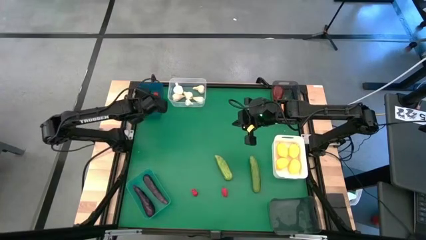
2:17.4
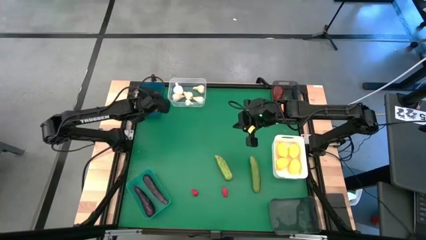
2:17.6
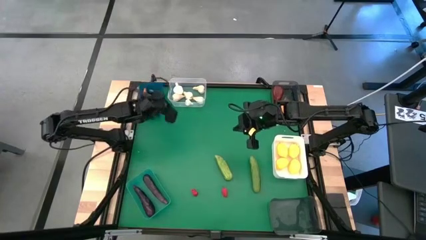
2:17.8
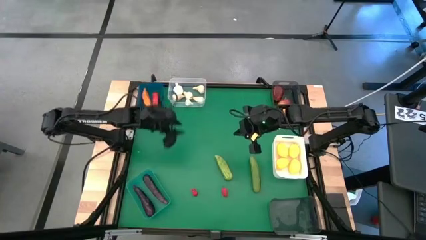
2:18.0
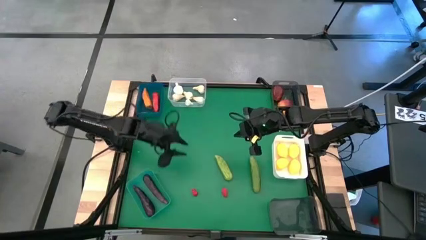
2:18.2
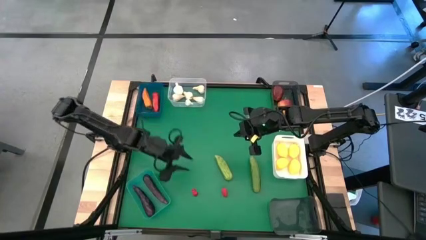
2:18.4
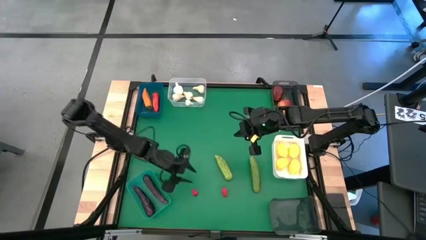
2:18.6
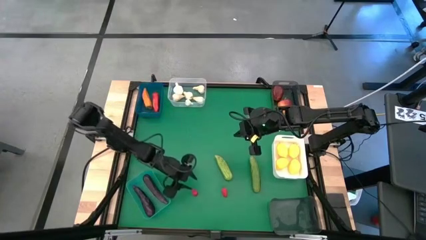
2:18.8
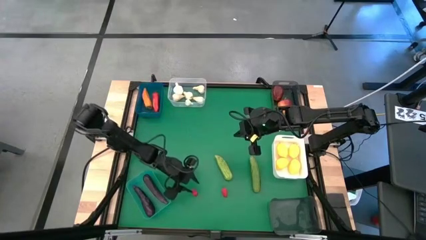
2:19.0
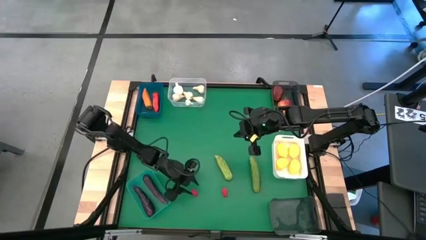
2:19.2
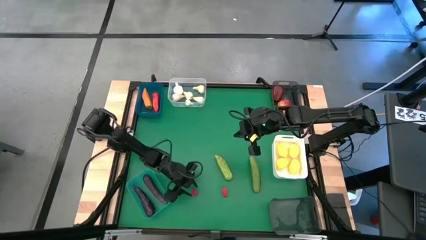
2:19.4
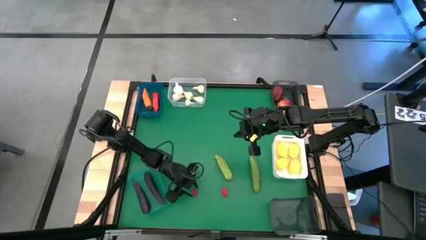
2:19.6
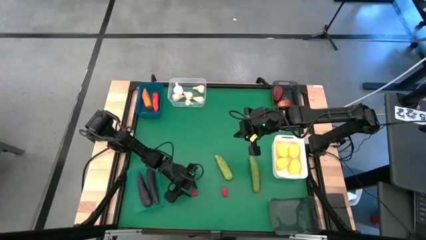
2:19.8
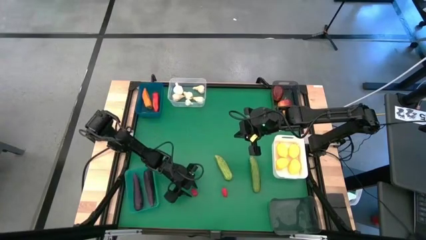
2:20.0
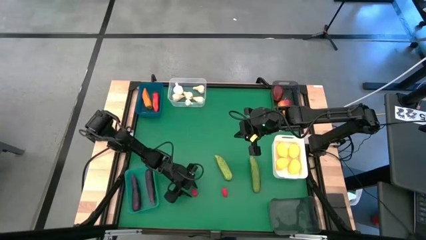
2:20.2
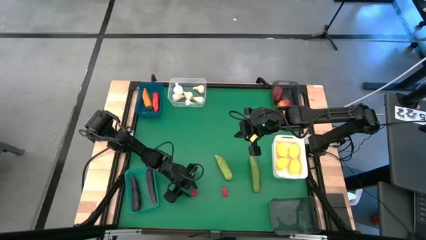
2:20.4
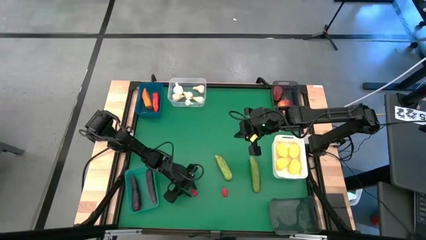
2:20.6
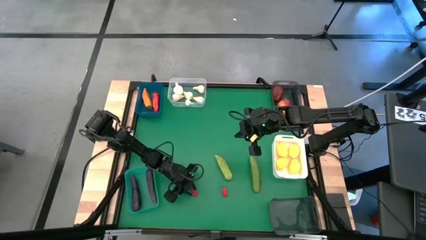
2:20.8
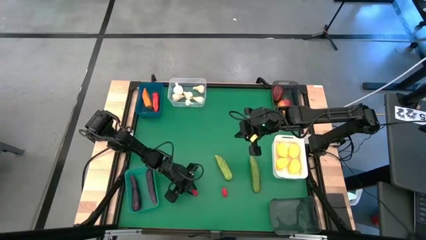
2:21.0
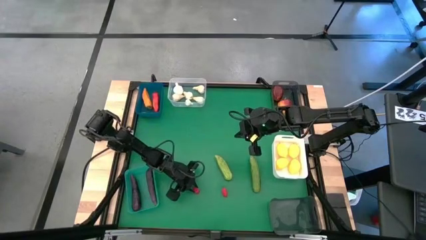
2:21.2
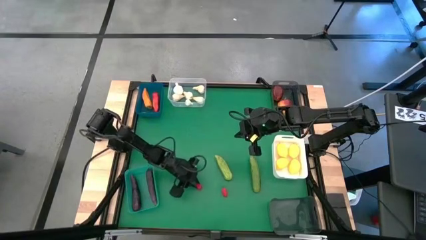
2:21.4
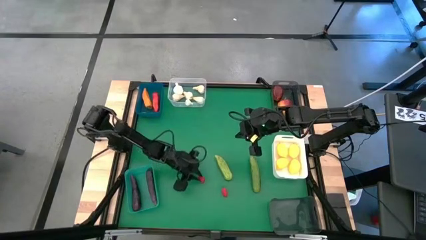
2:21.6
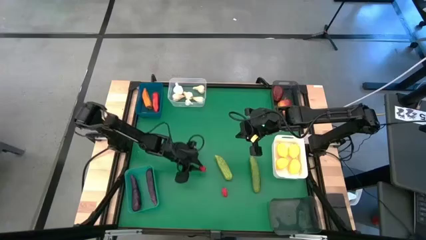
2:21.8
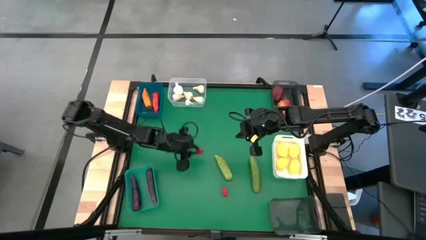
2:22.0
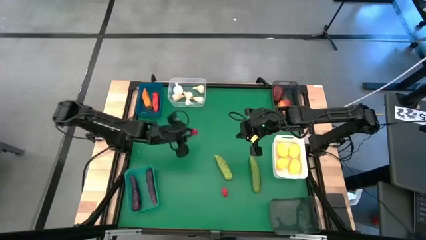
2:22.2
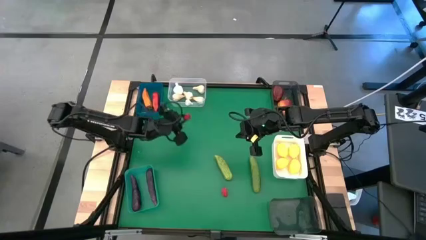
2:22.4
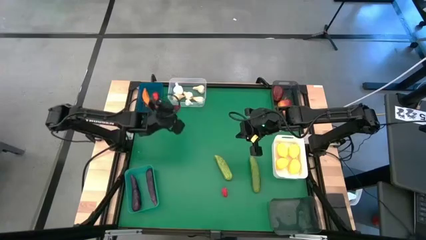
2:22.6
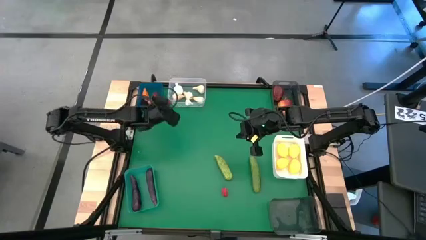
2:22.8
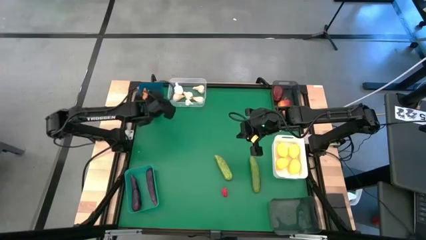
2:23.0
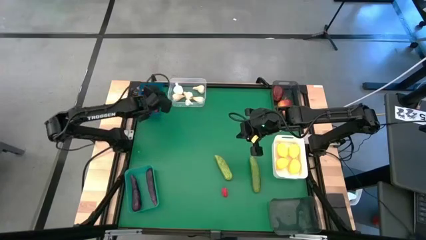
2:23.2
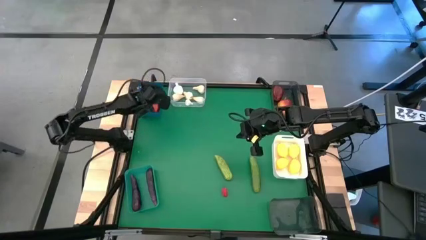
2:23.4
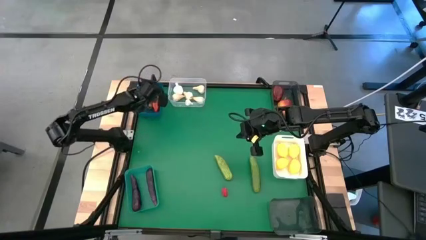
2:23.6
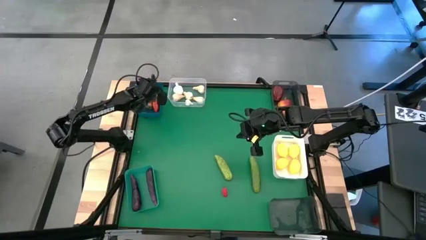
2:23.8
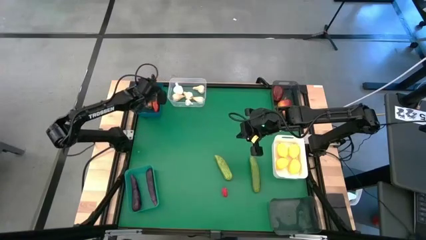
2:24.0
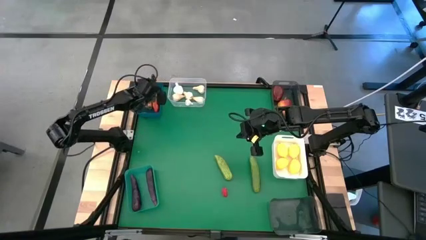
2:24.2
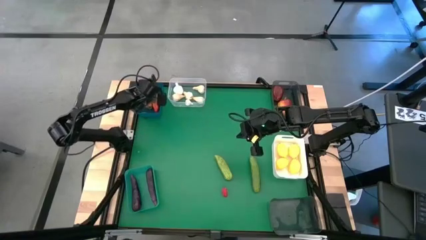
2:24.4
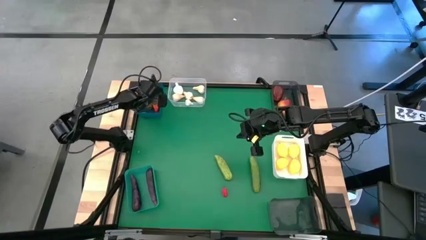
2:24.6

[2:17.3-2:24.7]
Task: Sort produce into baskets
Put the red chili pepper into the blue bin

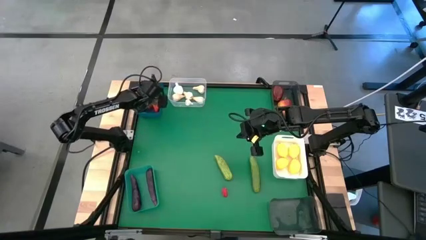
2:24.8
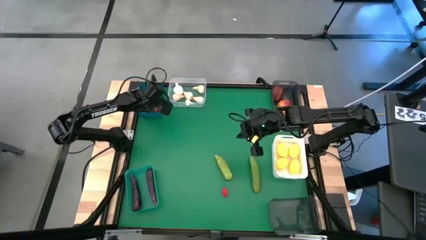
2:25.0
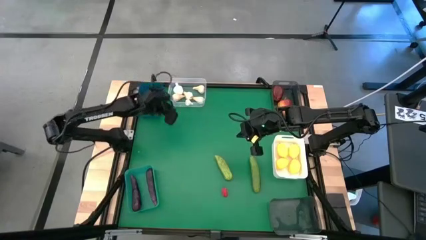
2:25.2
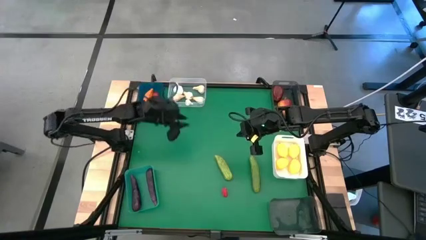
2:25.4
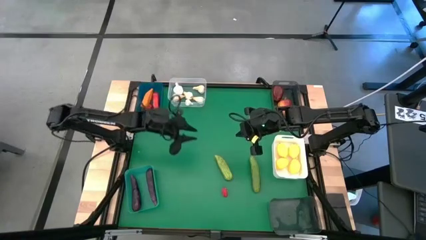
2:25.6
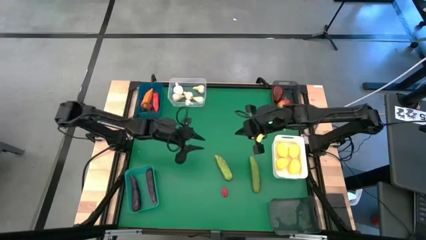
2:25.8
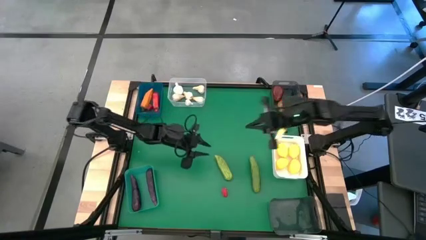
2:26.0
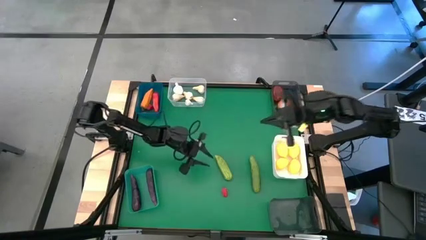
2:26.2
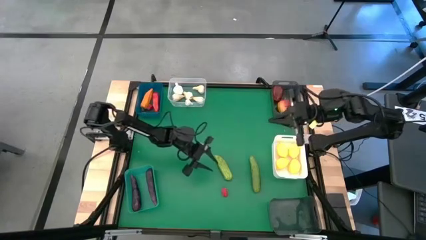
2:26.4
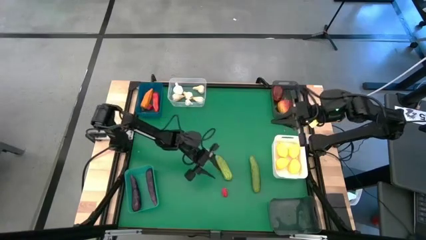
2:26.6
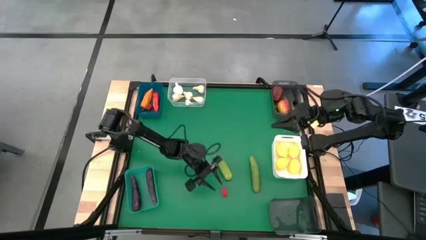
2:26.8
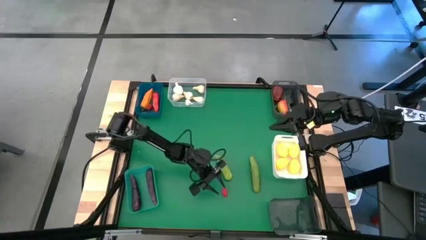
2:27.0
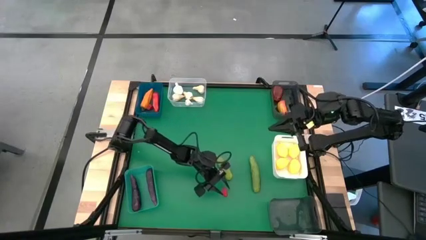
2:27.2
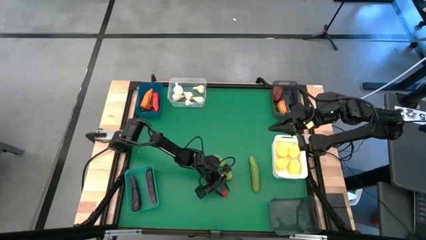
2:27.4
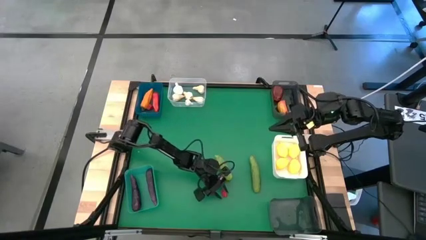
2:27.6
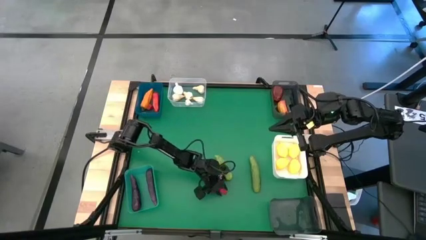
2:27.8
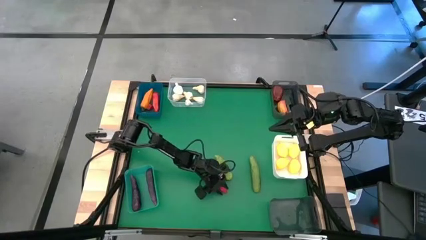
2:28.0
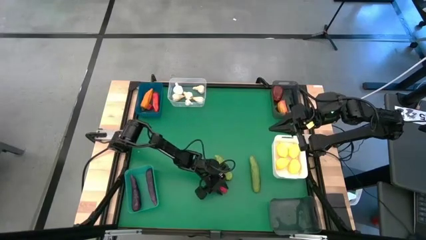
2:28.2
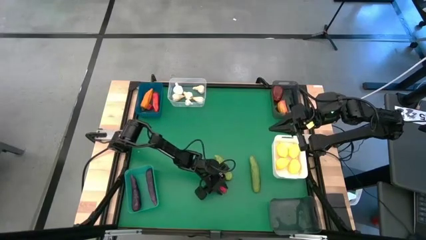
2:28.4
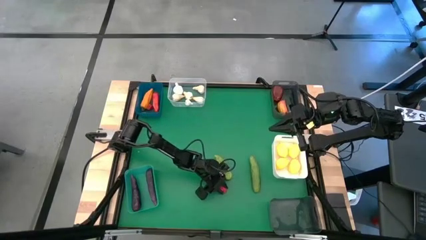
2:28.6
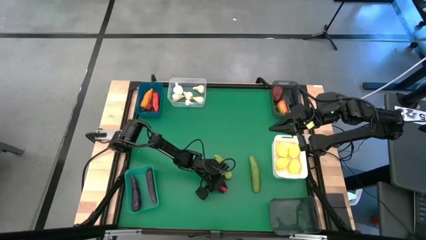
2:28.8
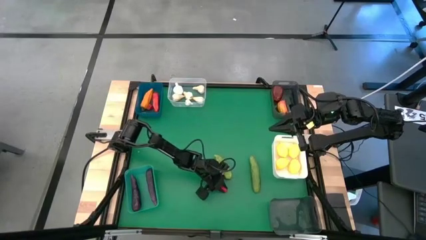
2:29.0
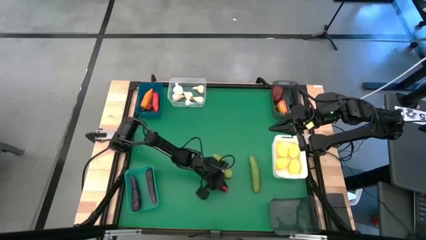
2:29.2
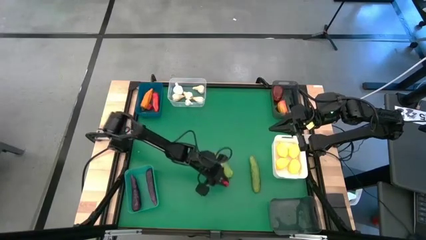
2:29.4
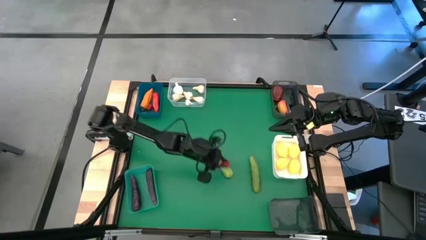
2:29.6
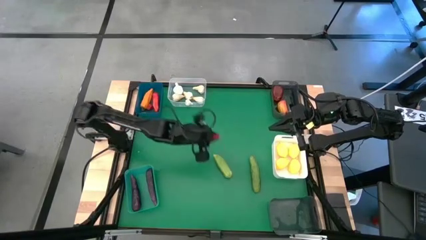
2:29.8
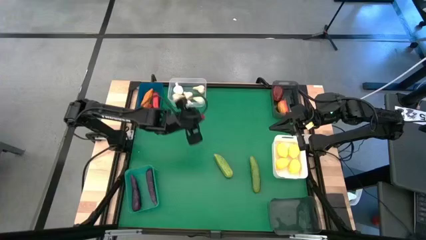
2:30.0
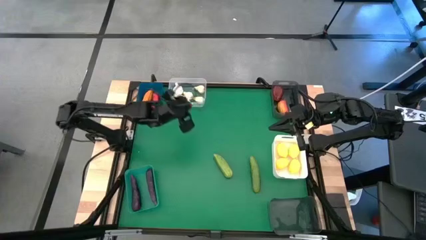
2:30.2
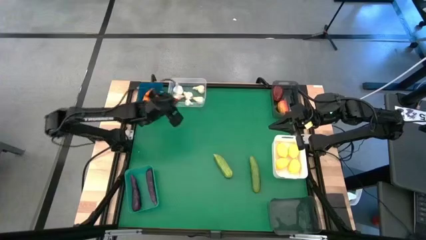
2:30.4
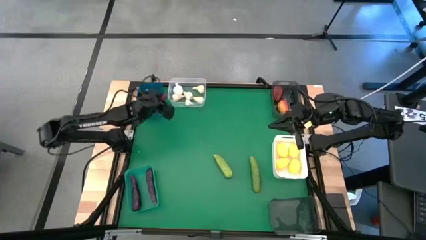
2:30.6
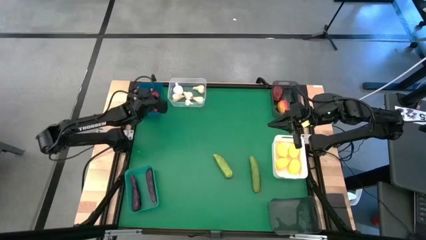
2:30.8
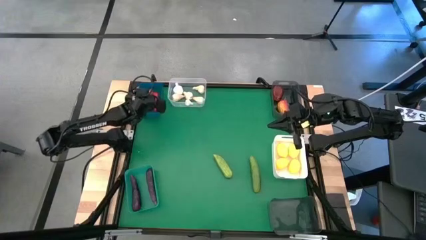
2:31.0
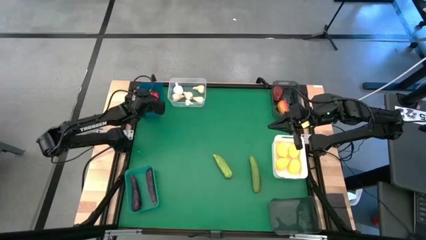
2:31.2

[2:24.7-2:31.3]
Put the red chili pepper into the blue bin

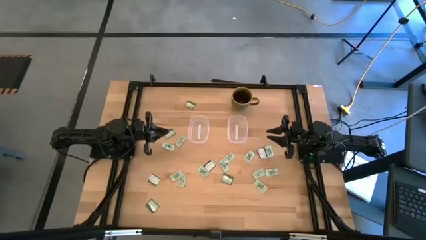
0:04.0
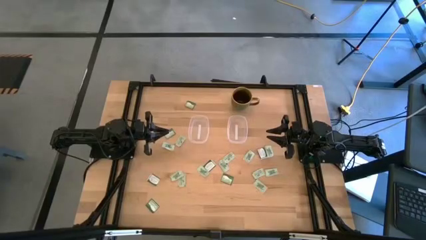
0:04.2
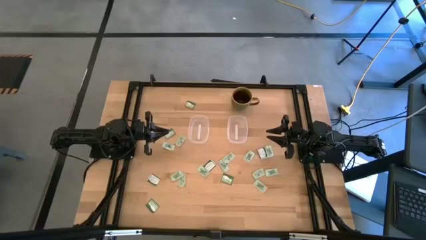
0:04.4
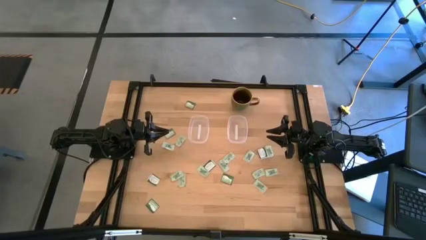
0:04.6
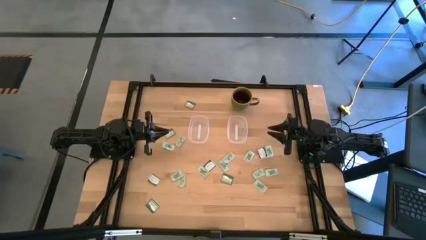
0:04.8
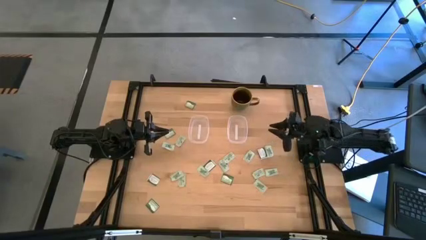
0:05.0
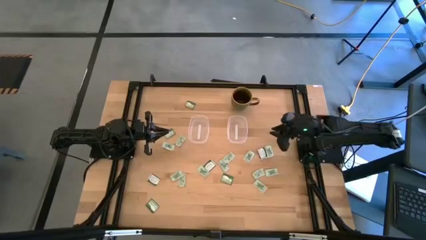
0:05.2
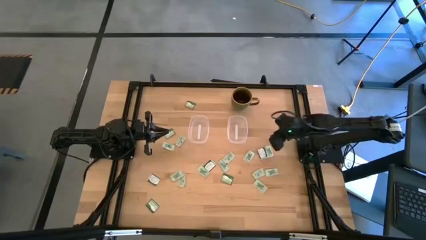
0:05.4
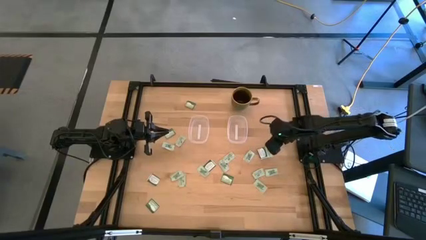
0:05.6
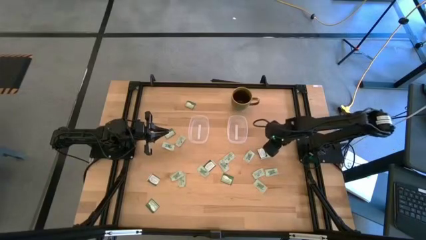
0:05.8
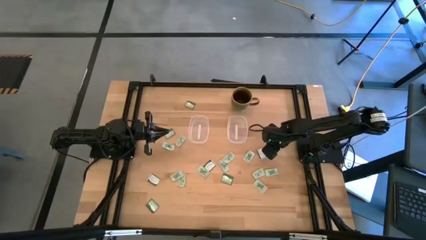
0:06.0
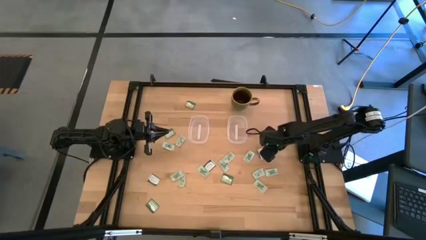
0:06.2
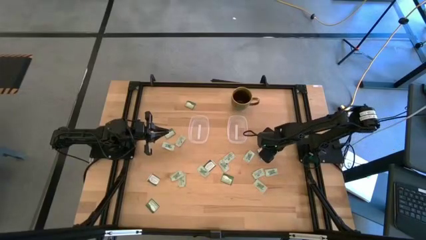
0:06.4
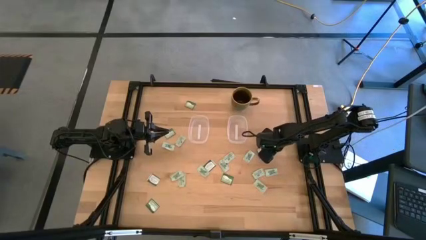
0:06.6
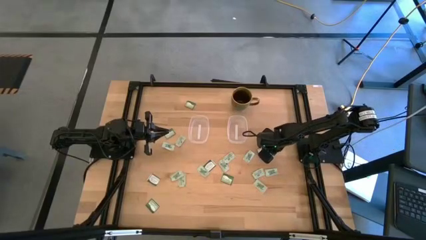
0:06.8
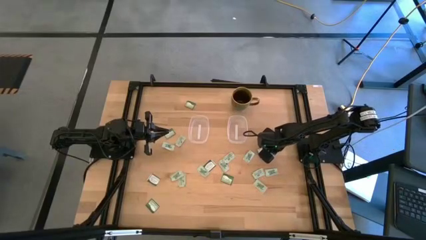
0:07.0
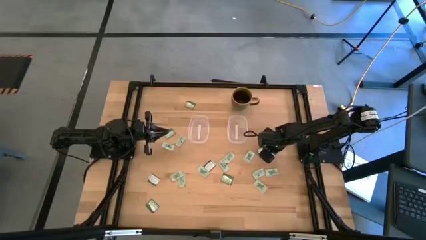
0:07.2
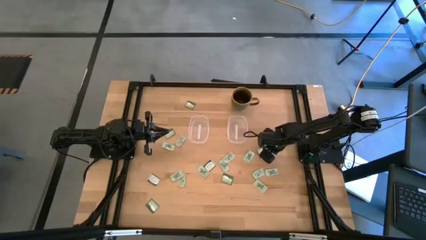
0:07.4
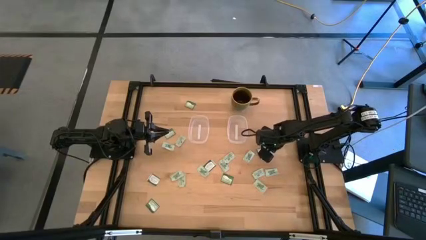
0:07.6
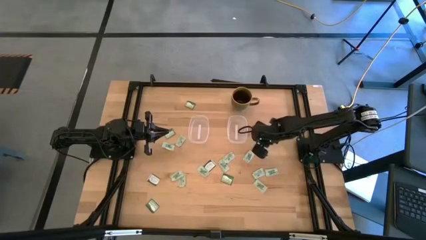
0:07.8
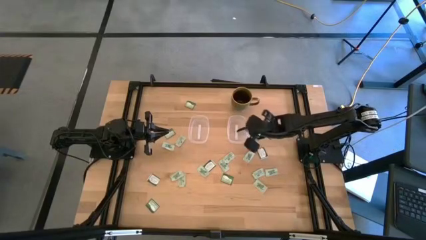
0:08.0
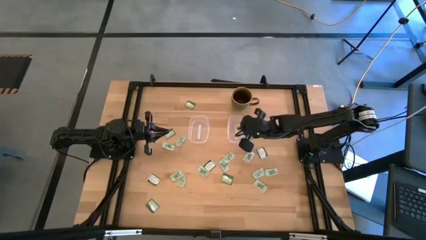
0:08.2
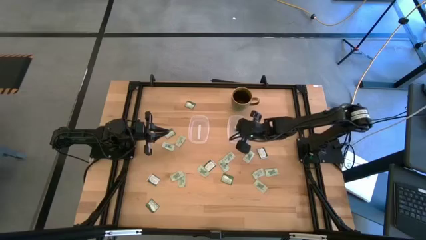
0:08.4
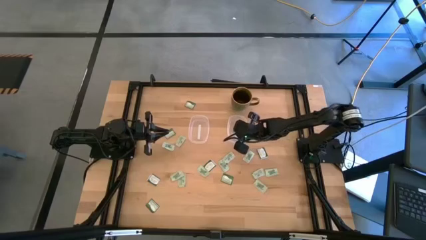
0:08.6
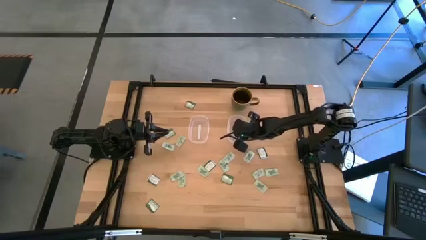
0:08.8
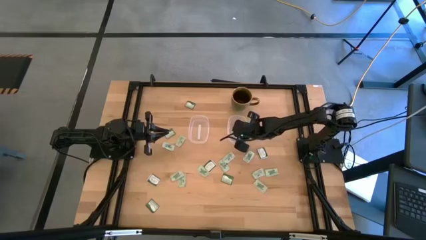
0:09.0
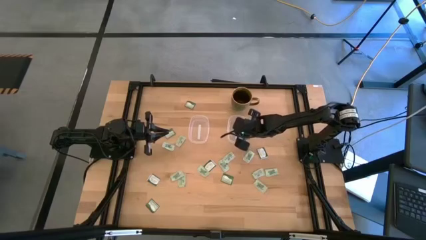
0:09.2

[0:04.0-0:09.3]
Task: Pick and place items into bin
Put the stevia packet into the right transparent bin
